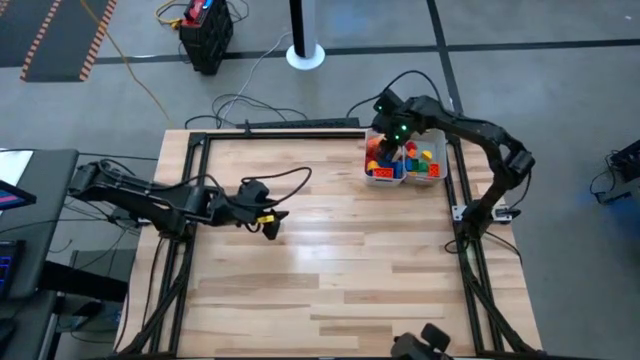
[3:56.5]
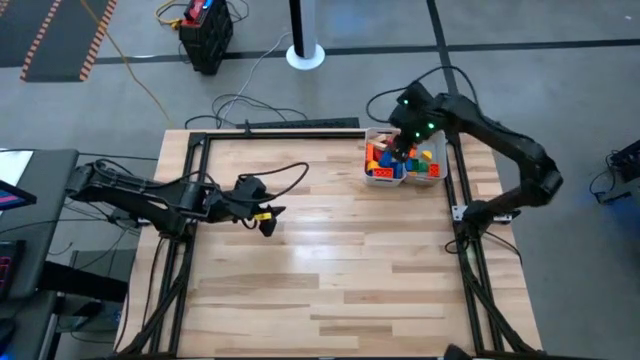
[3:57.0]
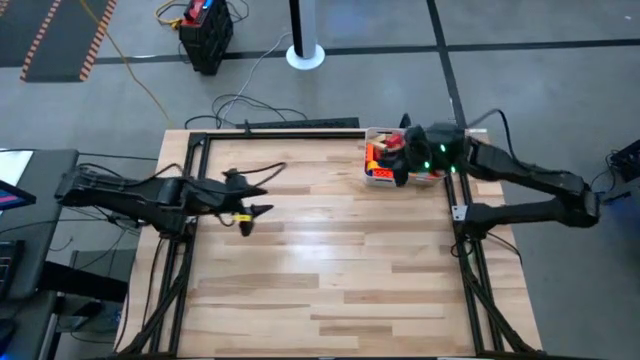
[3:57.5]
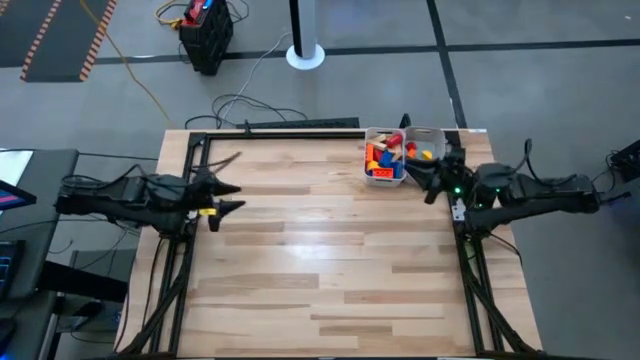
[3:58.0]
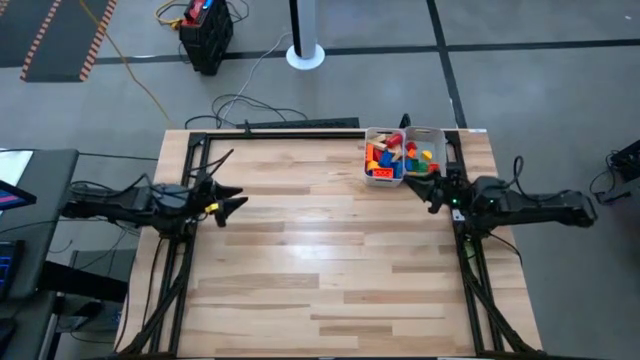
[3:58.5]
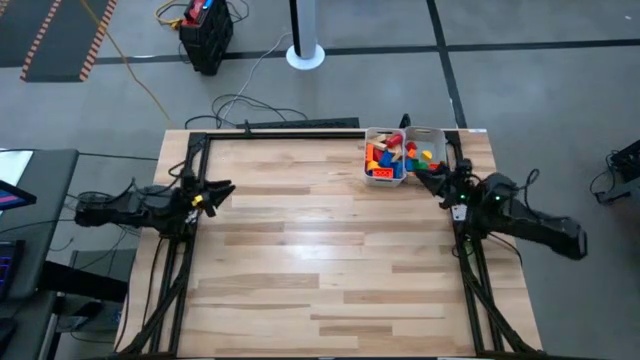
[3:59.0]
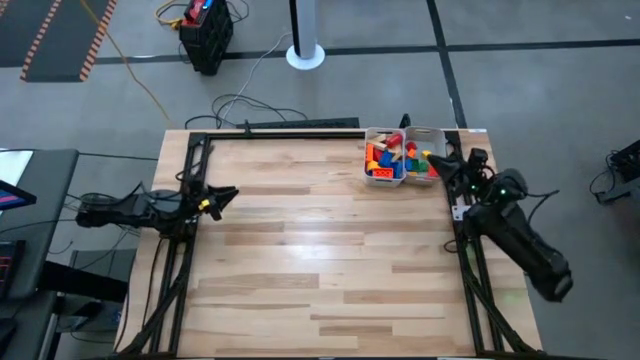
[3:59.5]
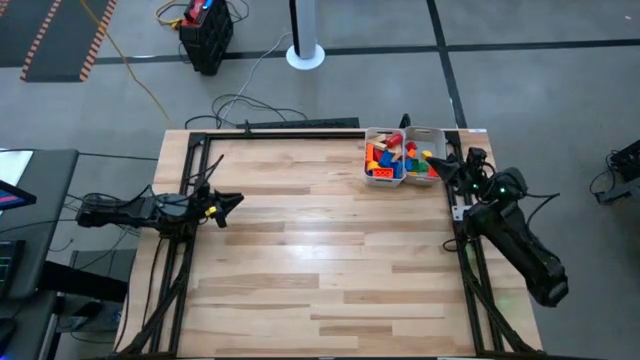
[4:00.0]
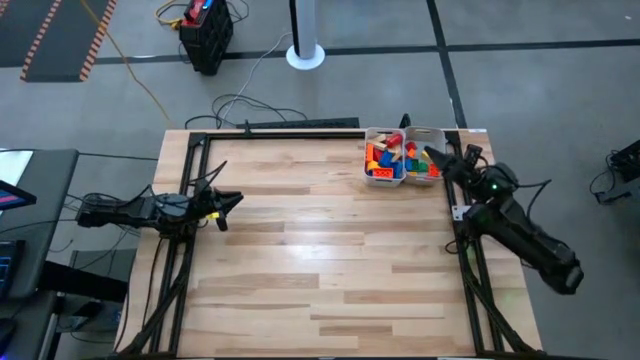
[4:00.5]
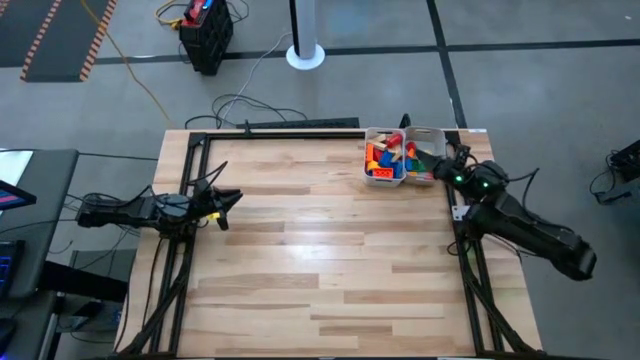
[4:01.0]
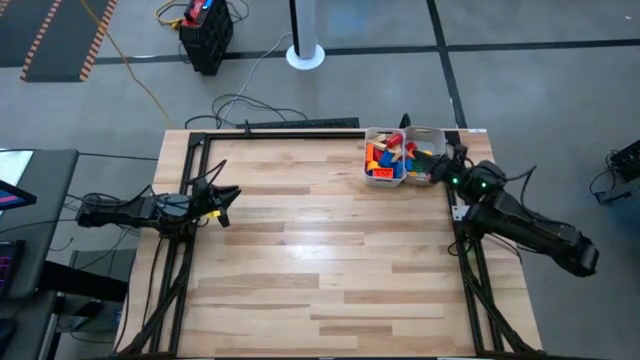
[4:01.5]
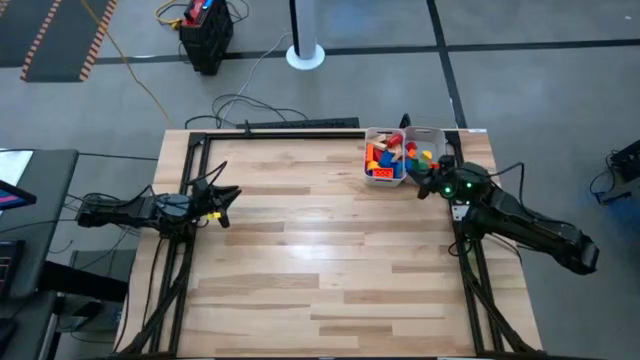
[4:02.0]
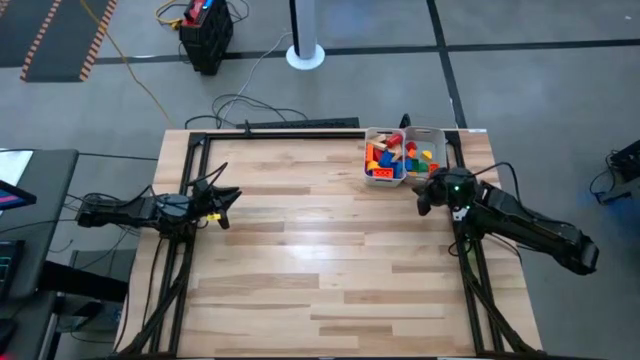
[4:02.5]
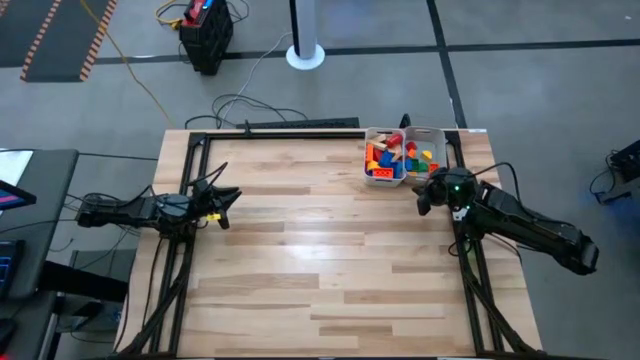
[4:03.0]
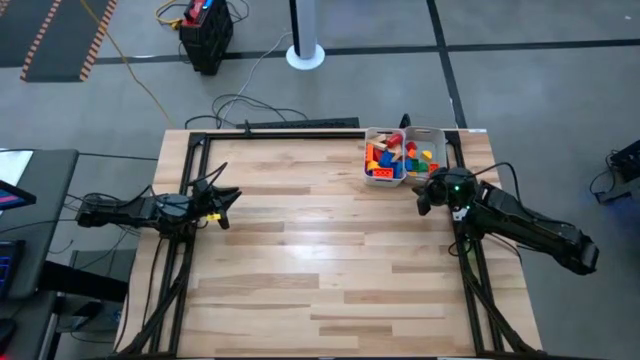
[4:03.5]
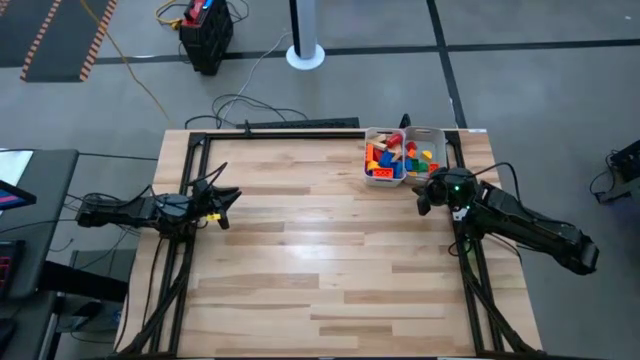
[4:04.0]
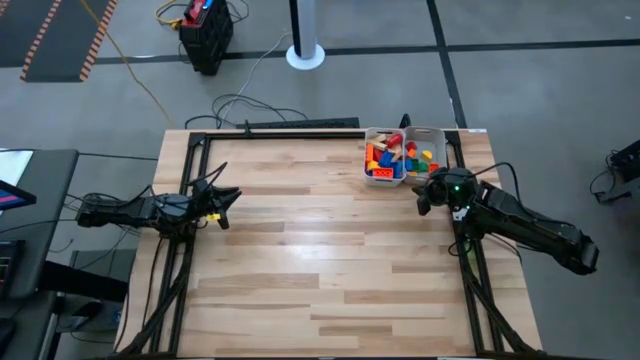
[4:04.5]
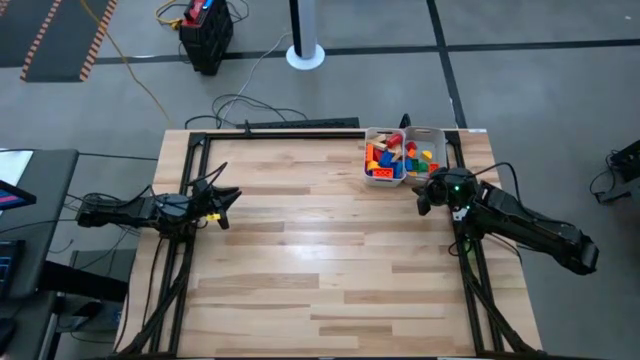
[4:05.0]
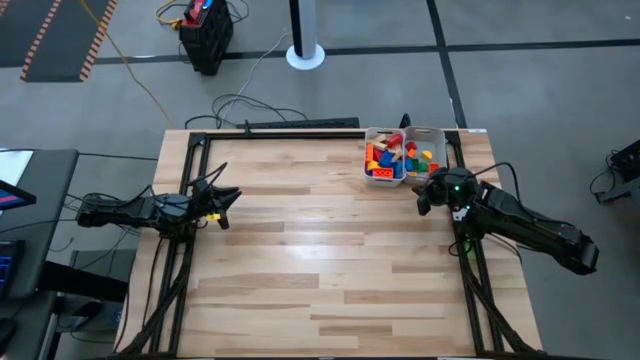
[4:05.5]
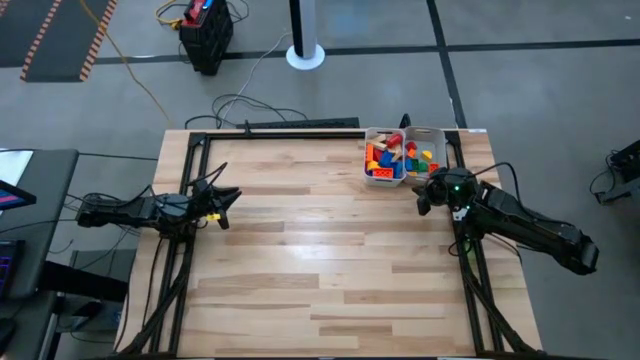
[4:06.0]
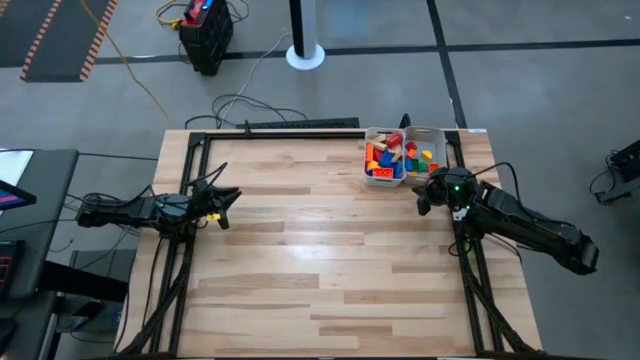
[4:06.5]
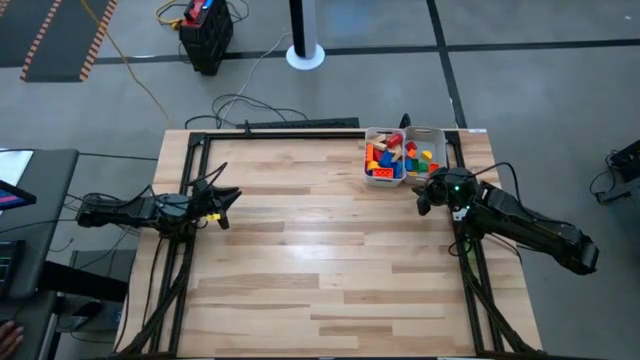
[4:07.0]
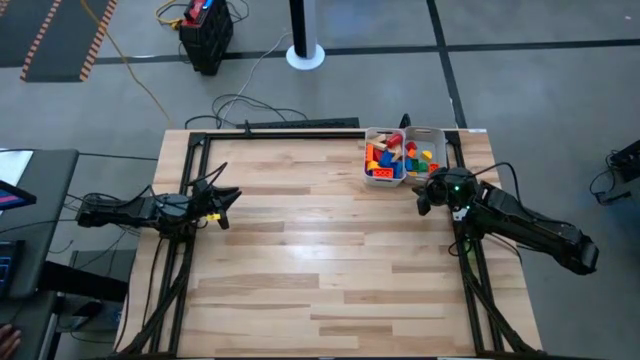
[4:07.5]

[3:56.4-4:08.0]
Task: Sort blocks by size
Return to Home Position

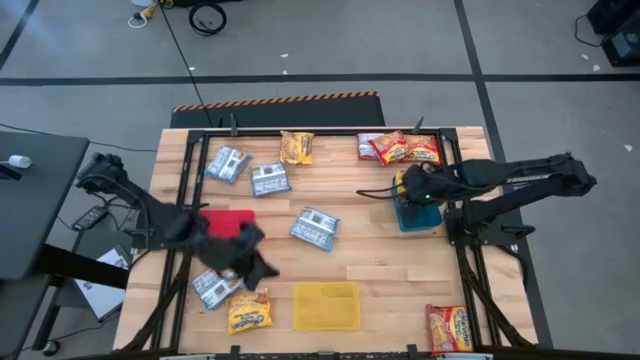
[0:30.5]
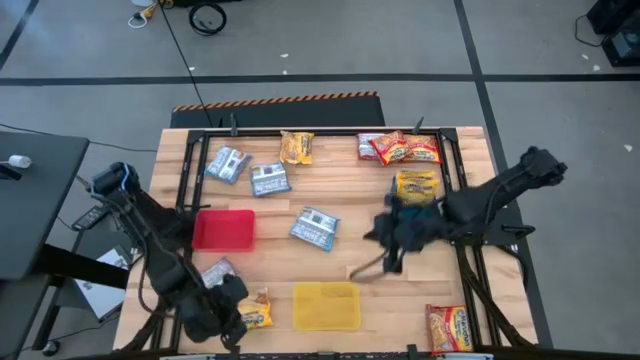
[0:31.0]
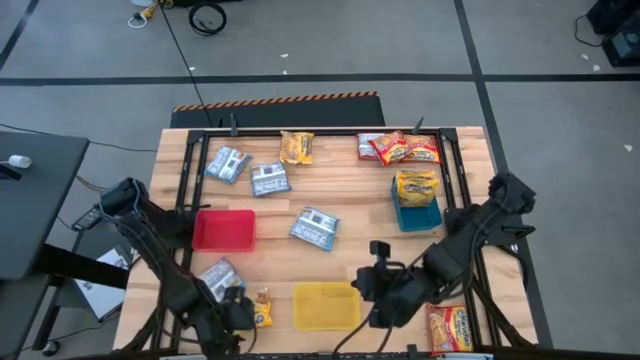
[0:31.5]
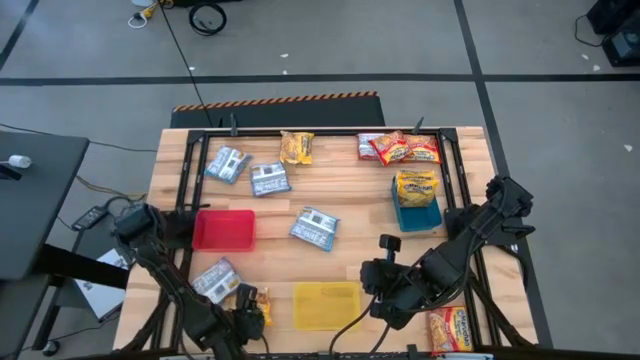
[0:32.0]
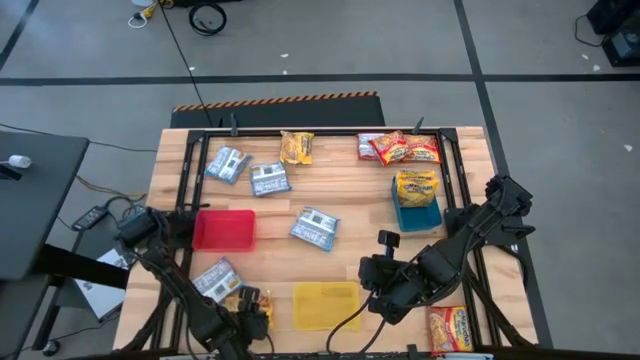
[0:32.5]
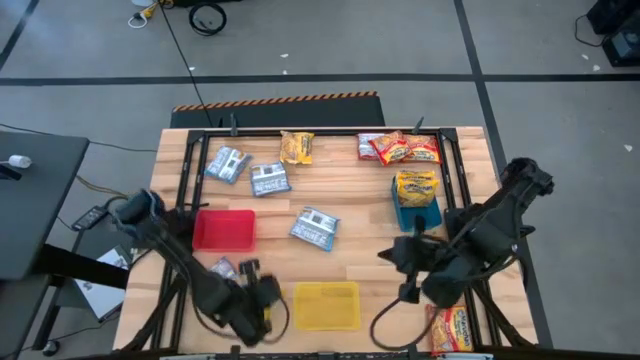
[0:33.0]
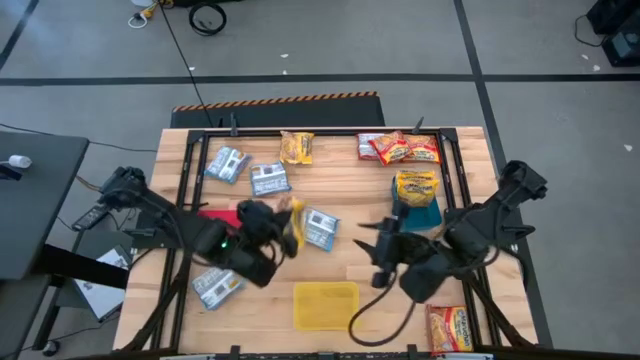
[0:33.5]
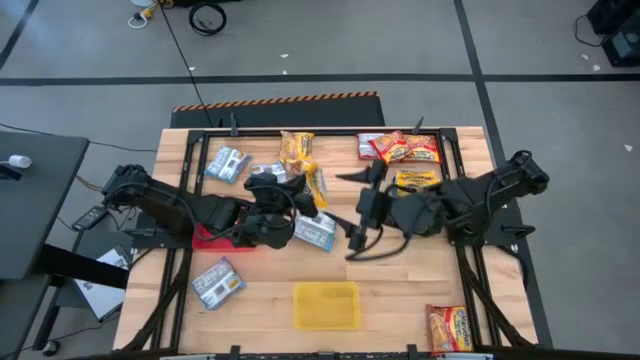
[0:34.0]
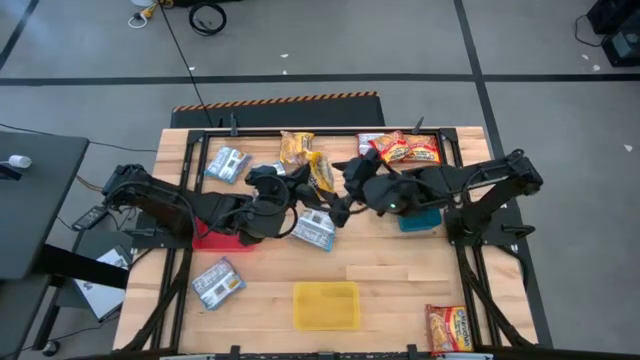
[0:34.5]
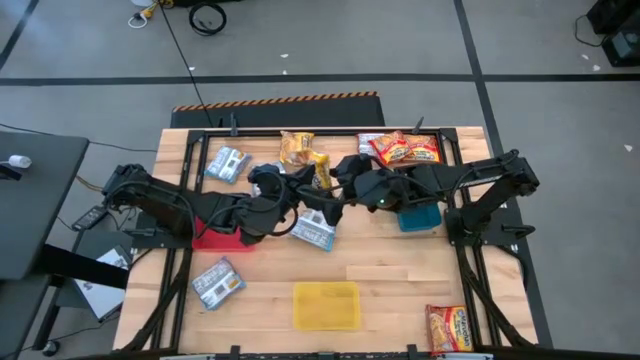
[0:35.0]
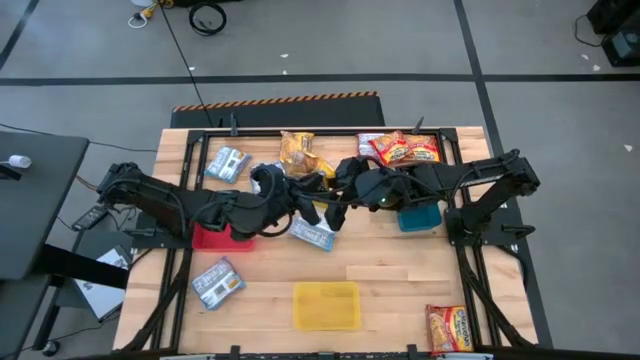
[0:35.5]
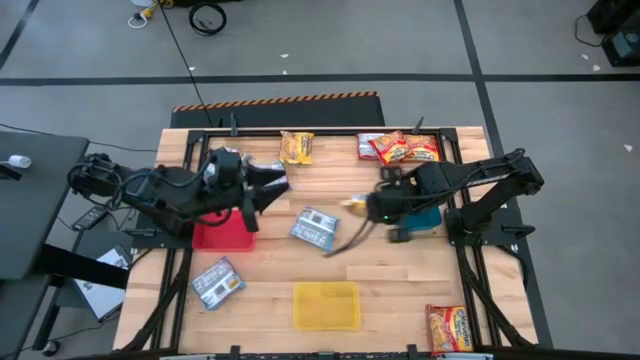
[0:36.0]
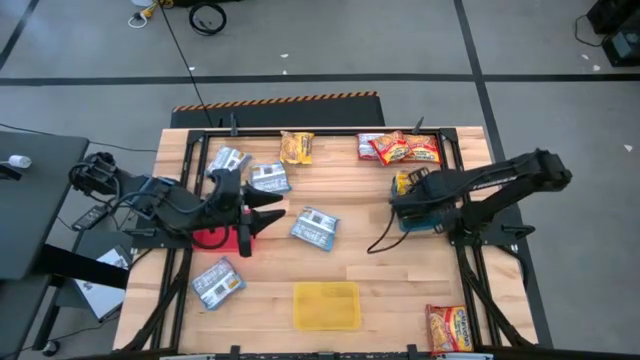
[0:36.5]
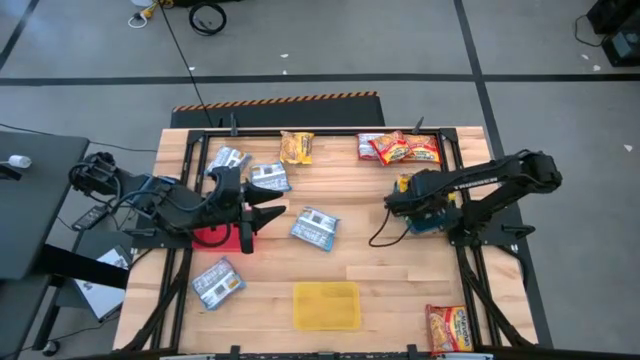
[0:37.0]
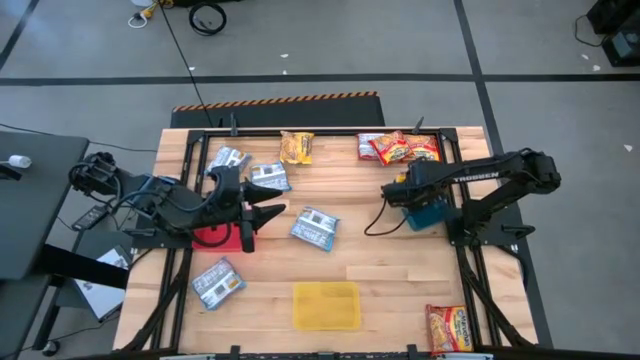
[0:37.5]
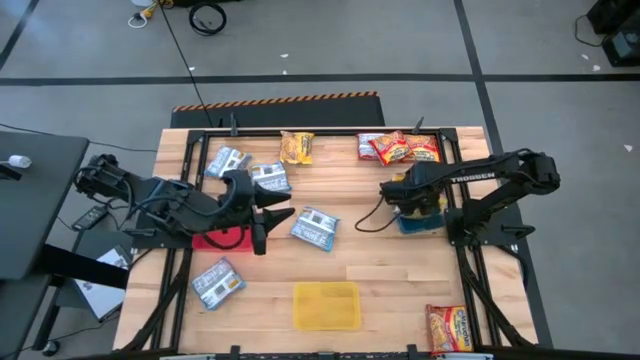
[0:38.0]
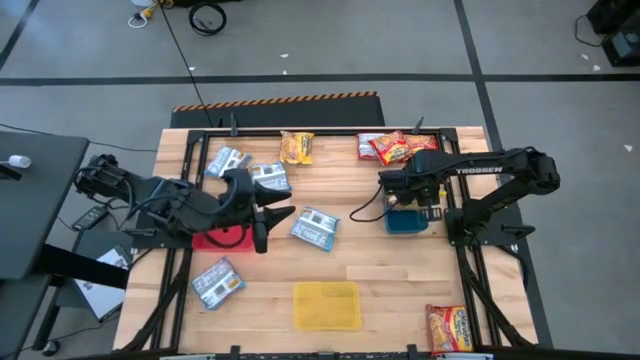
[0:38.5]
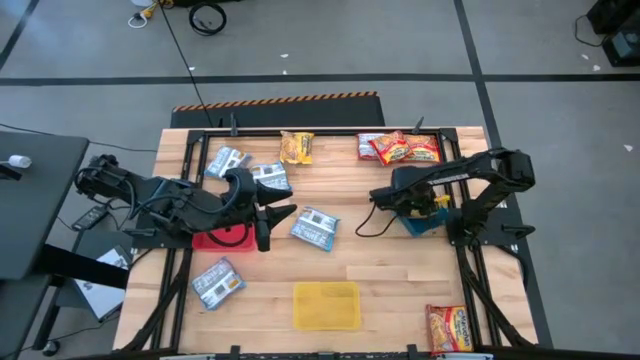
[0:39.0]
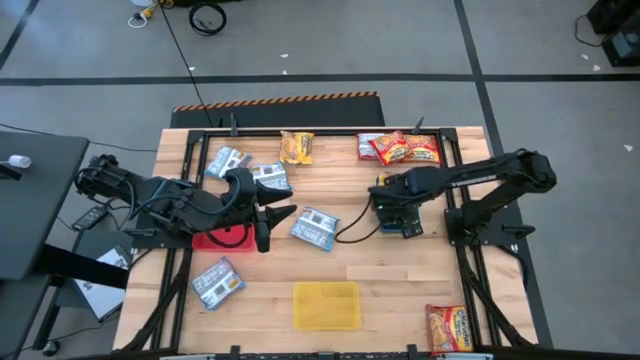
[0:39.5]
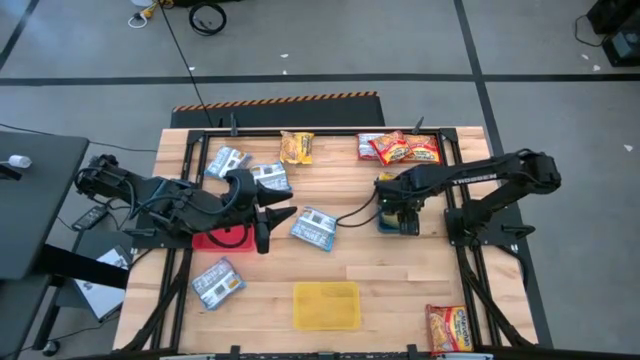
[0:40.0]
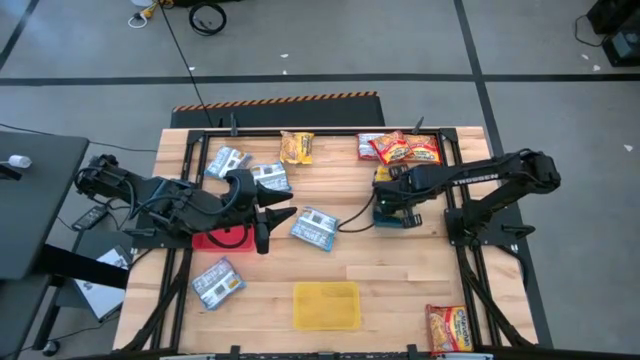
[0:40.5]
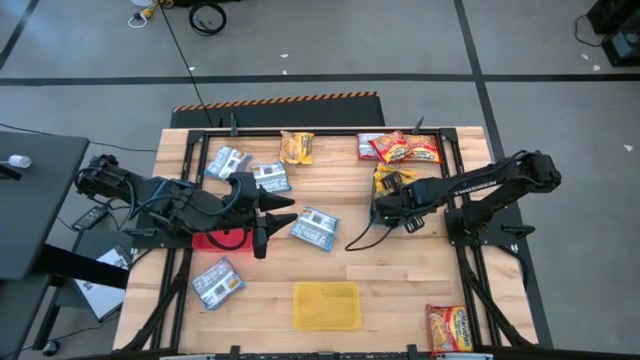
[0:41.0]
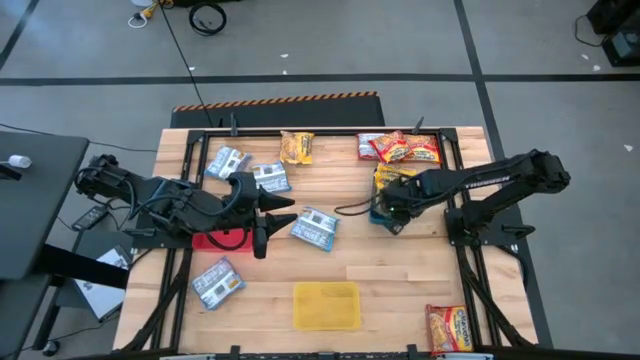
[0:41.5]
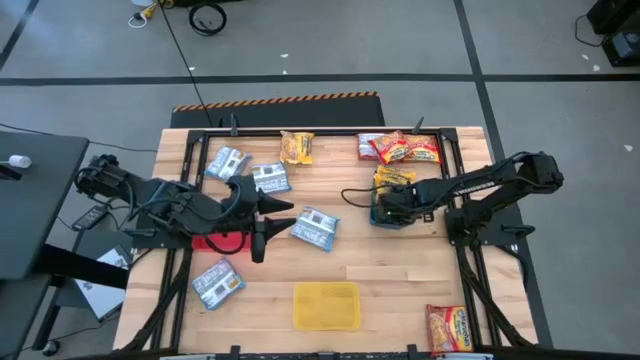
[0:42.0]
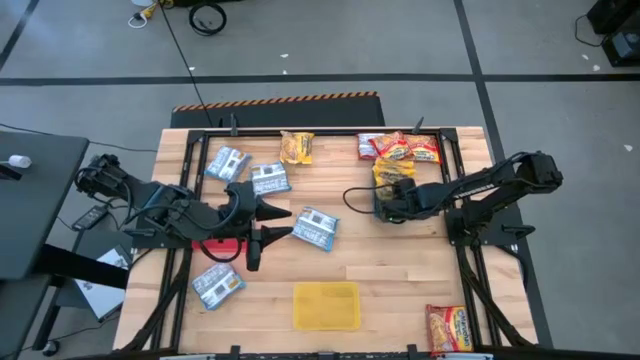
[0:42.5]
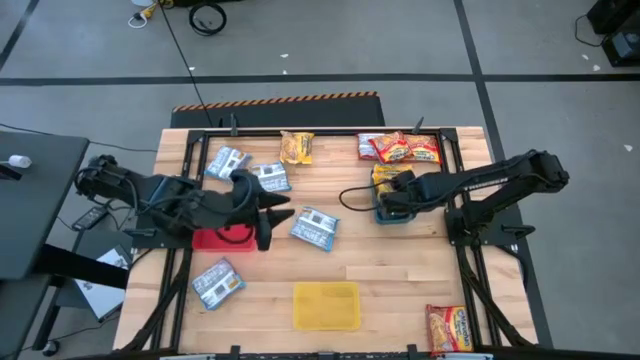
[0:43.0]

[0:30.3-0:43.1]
Task: Sort Maruchan noodles
Put the yellow noodle pack into the blue bin
